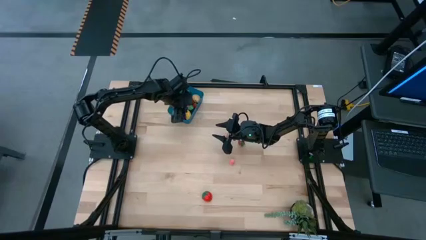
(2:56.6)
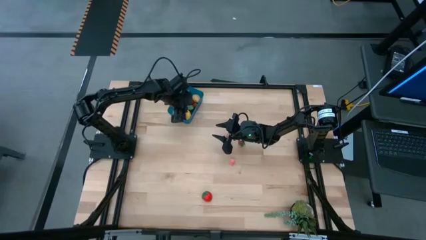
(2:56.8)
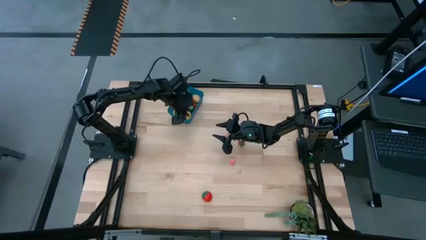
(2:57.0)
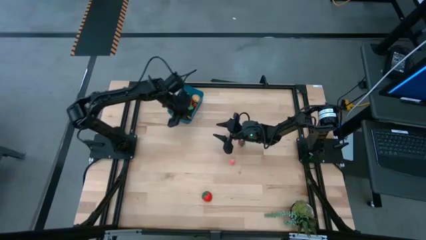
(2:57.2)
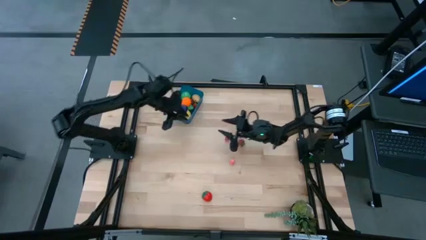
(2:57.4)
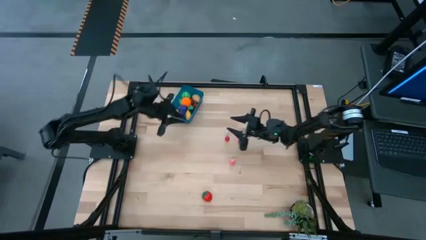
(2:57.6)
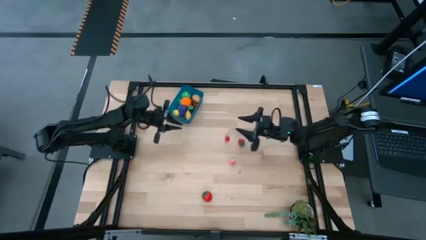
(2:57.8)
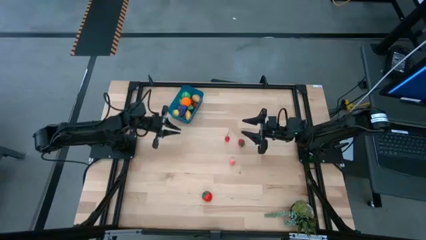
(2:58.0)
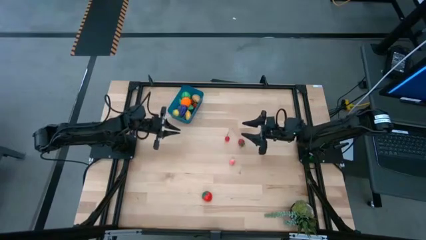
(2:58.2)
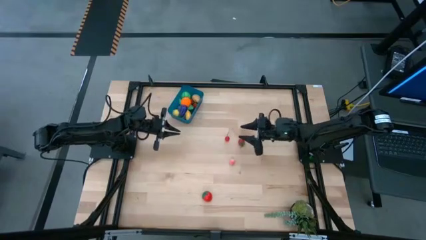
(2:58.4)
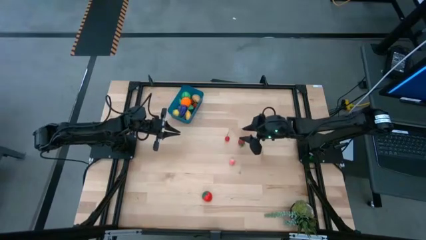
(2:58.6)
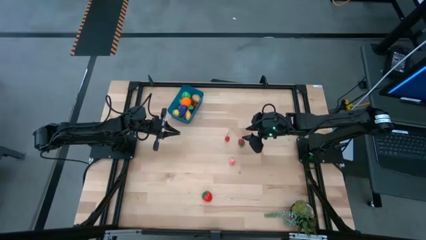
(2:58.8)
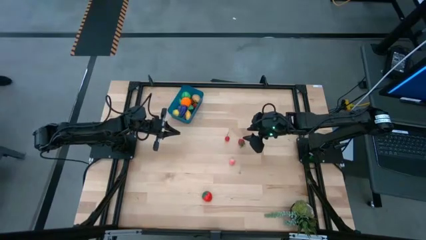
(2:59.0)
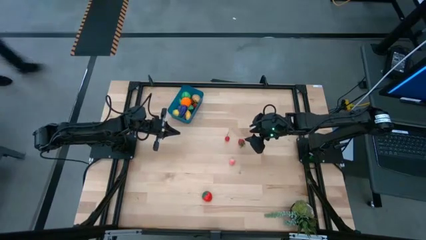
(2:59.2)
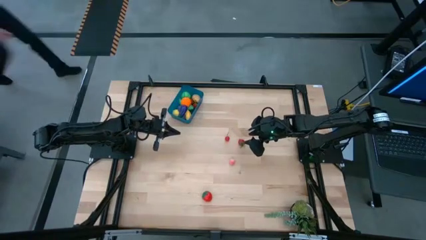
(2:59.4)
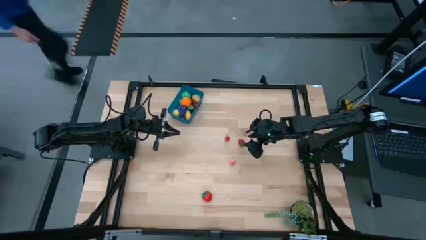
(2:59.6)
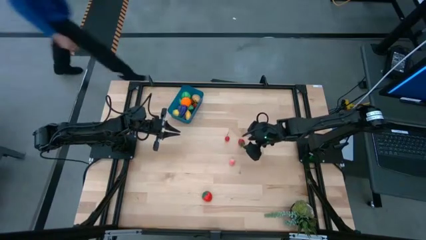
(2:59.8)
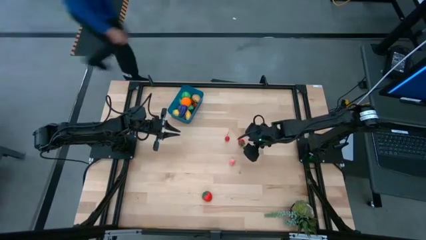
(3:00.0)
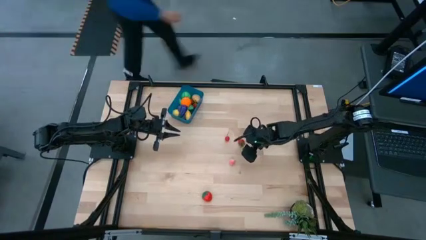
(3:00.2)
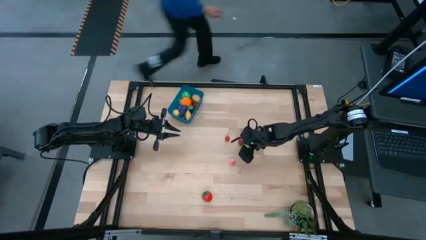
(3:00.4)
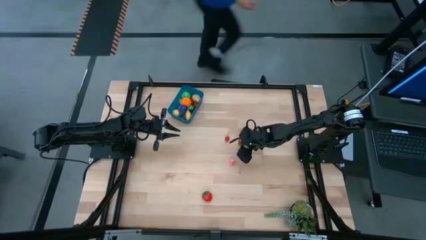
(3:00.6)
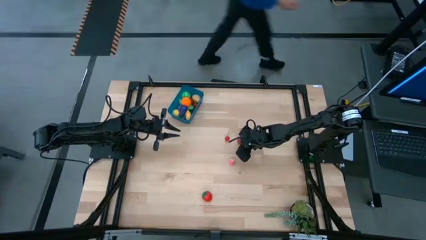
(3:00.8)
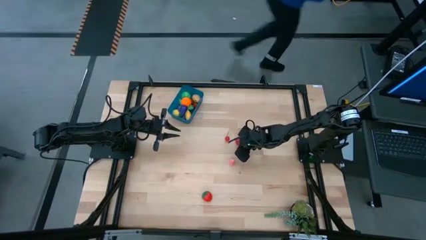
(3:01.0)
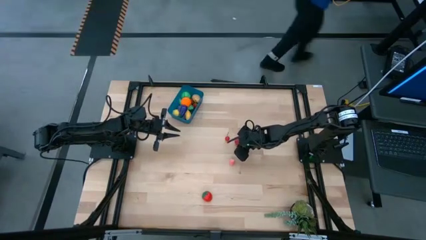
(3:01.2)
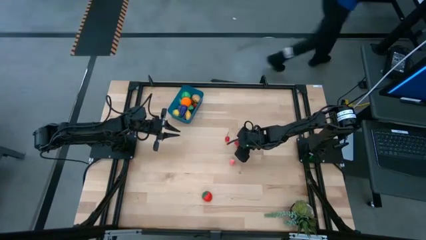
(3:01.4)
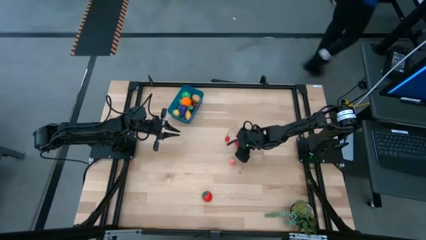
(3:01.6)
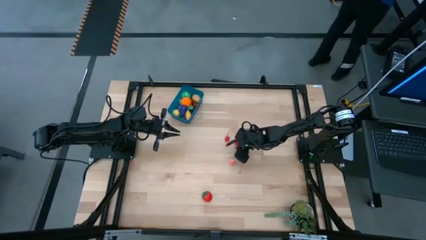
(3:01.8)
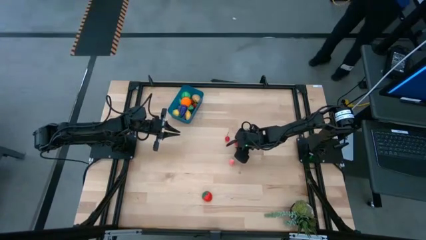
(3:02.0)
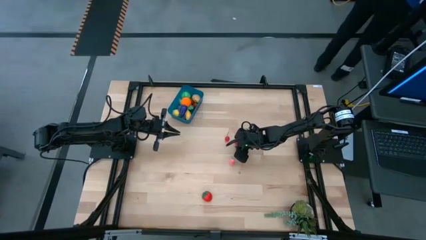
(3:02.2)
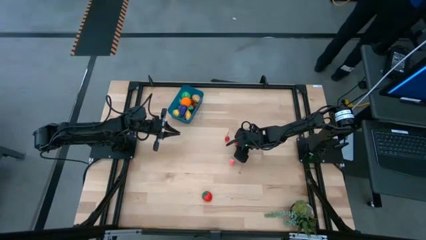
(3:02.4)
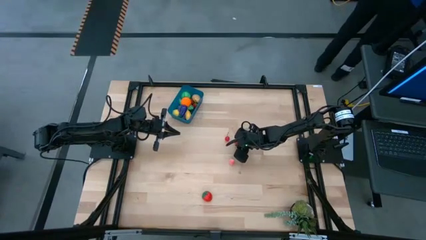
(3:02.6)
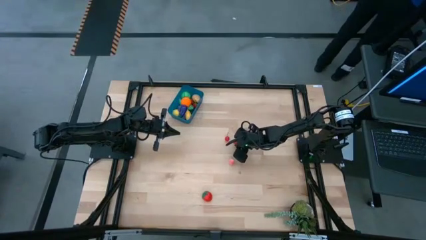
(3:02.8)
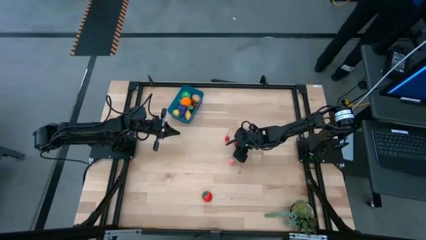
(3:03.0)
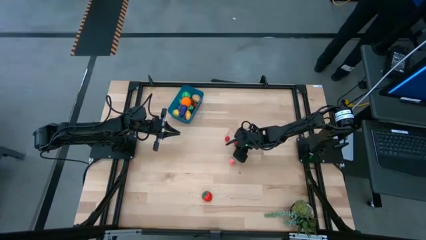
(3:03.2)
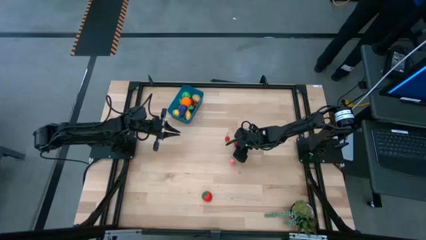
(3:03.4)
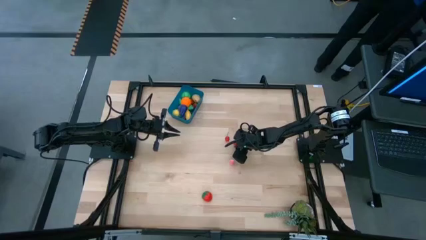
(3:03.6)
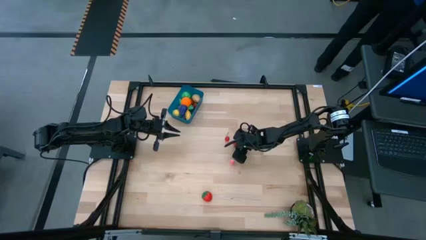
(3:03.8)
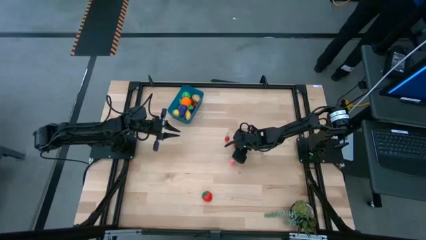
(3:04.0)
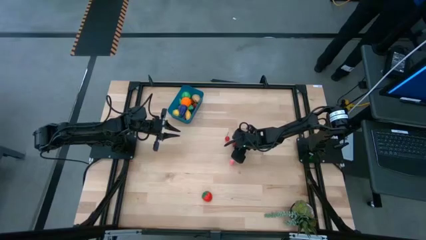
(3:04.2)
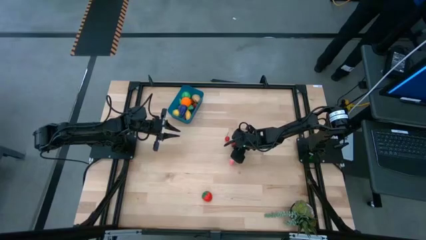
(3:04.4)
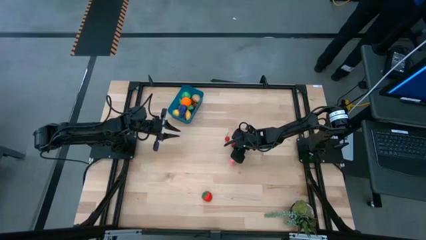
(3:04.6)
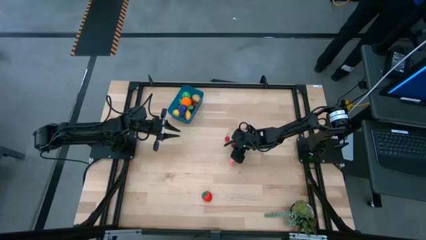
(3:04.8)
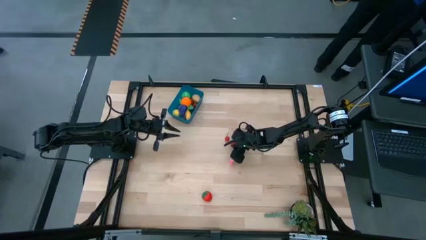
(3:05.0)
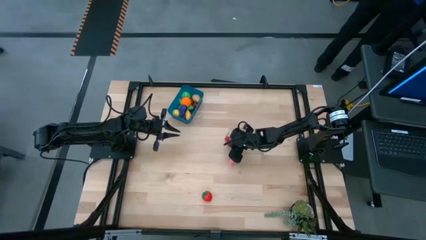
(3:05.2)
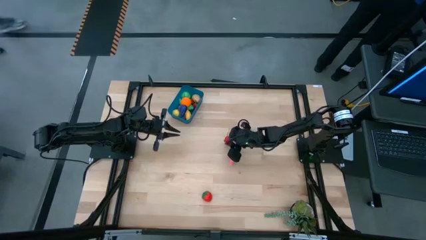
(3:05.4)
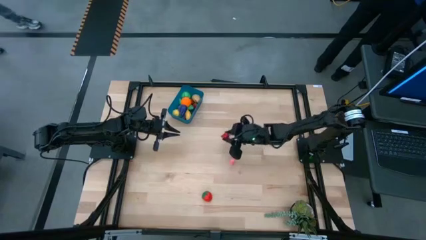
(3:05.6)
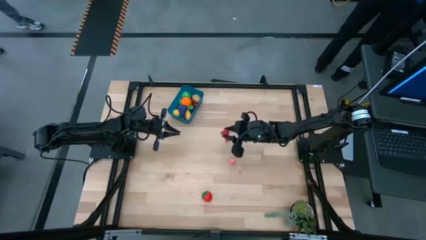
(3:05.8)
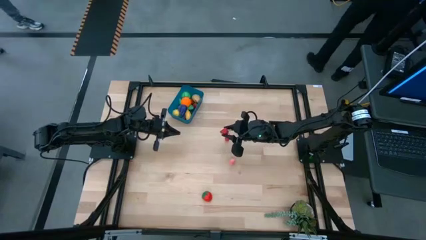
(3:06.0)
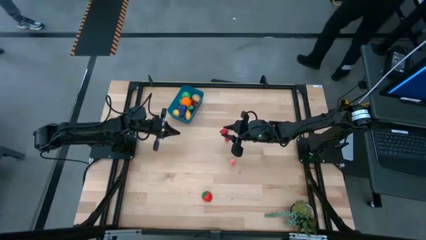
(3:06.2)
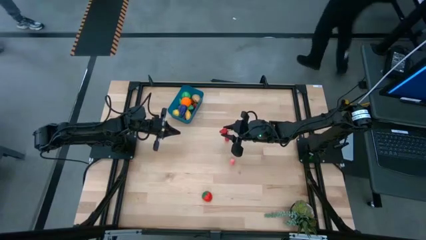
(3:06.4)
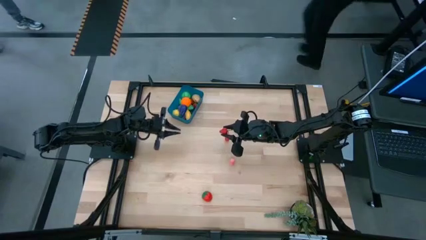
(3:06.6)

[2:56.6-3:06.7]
Task: Pick and placing Produce into tupperware
Put the top right red strawberry into the blue bin

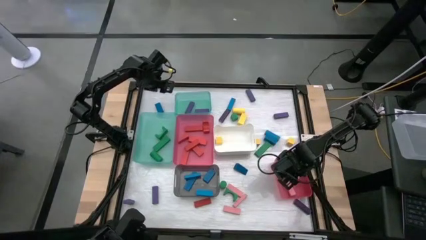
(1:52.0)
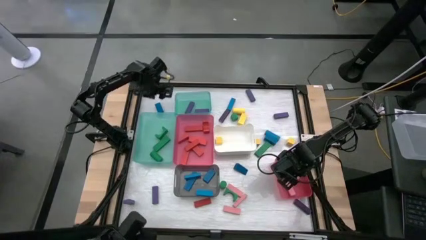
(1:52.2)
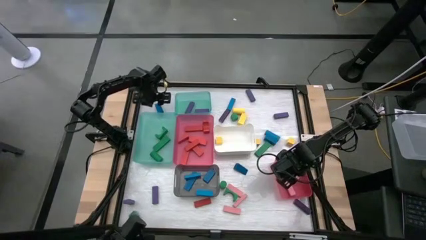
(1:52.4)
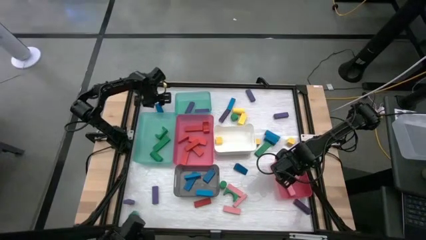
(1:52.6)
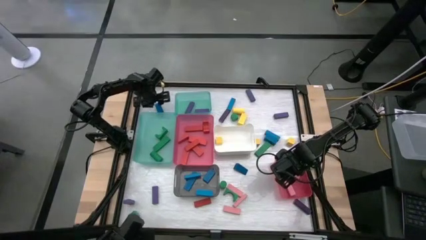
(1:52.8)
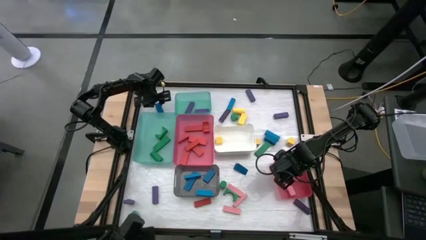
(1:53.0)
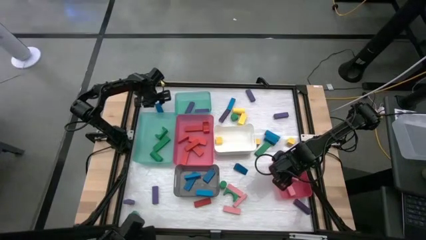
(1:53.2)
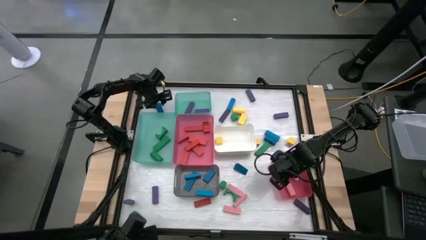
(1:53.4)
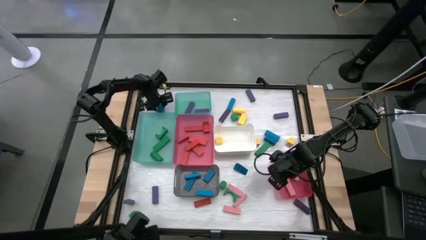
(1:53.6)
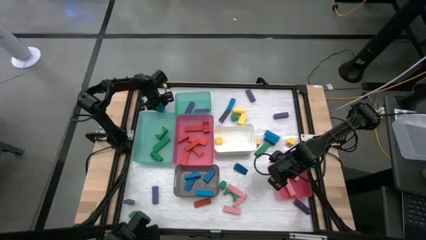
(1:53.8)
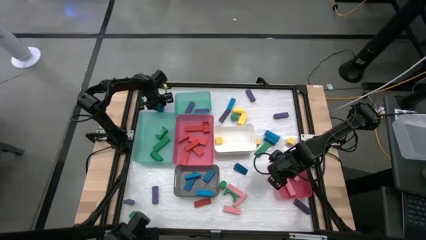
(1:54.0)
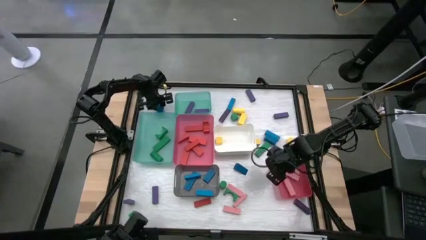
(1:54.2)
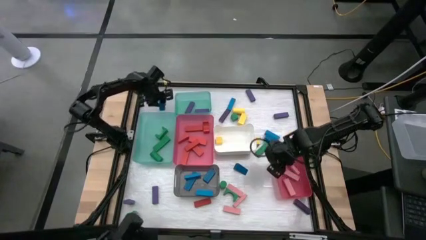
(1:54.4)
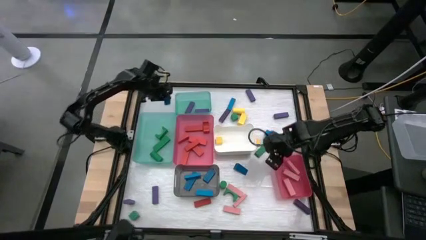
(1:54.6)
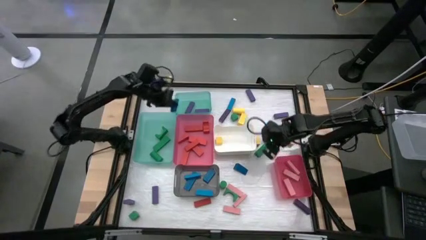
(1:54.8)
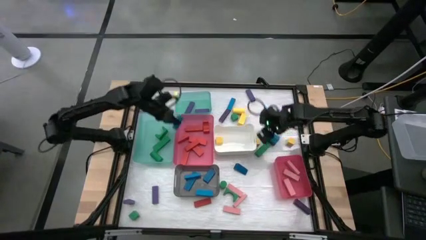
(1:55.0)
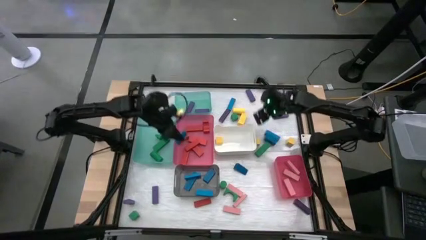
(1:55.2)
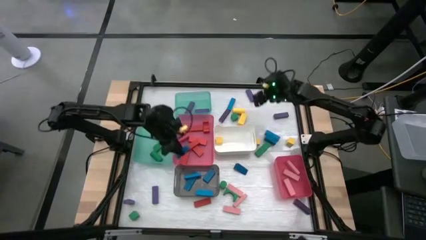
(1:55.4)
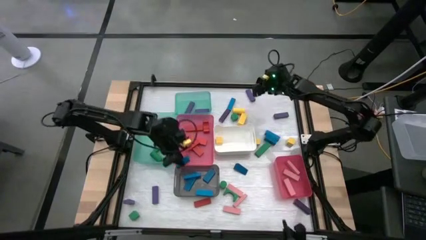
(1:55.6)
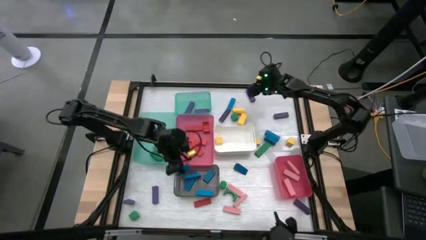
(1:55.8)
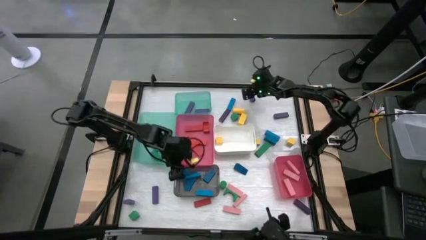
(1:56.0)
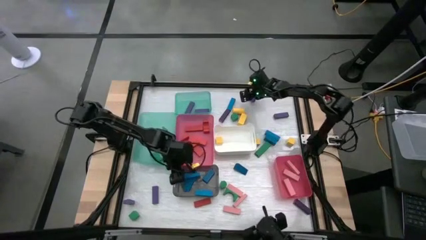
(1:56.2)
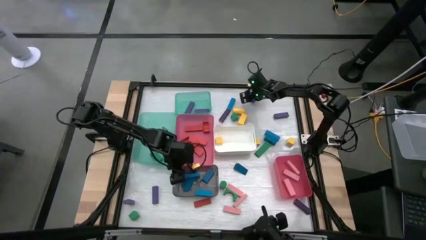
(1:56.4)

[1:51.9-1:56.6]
Task: Sort blocks
Put the blue block into the black bin

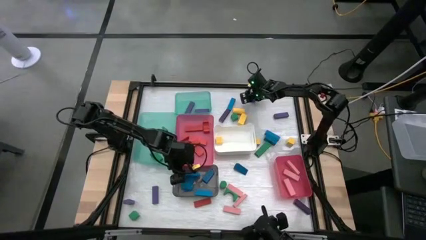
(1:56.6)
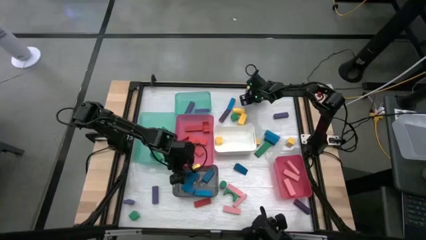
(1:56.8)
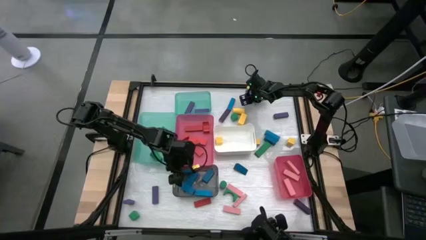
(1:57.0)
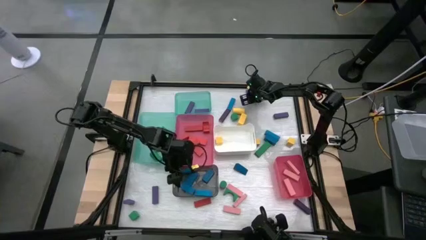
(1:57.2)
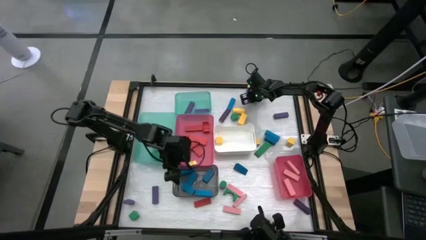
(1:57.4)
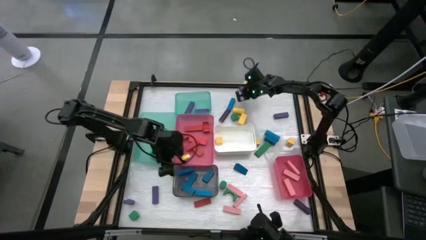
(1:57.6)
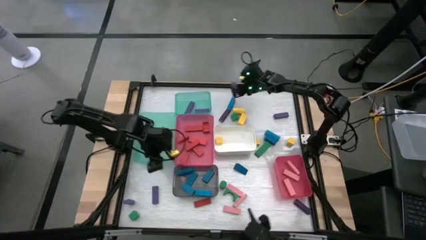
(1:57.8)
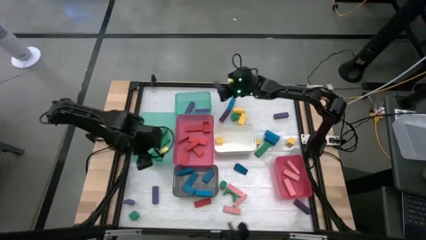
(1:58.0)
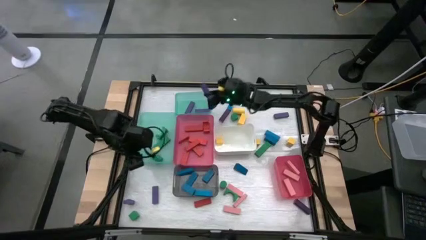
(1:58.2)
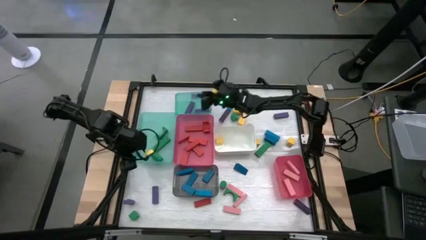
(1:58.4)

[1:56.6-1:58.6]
Put the violet block into the top green bin
